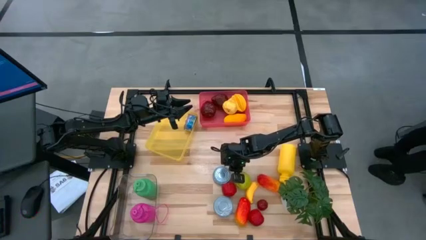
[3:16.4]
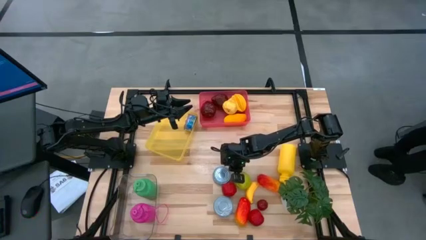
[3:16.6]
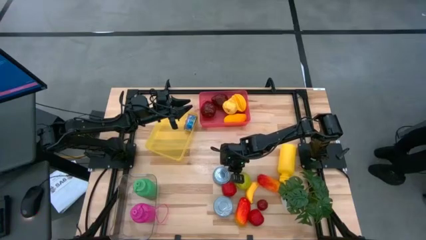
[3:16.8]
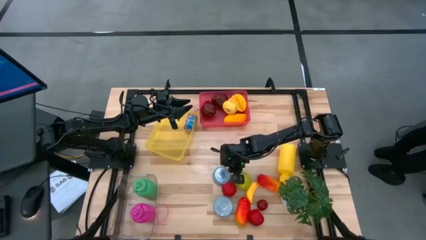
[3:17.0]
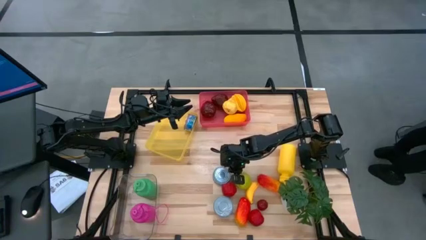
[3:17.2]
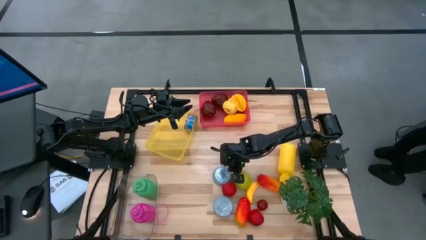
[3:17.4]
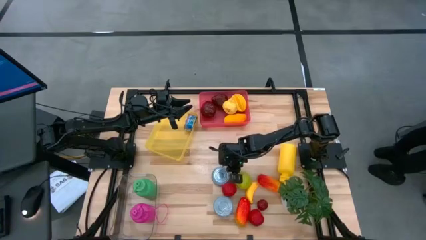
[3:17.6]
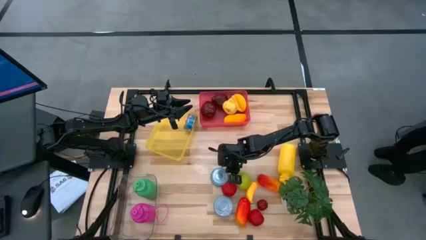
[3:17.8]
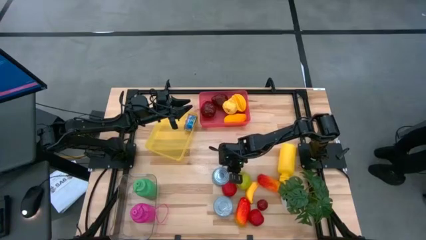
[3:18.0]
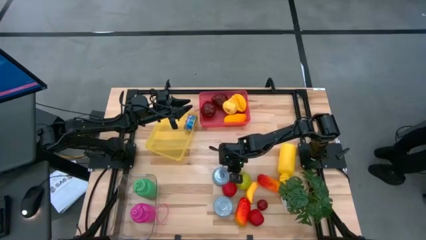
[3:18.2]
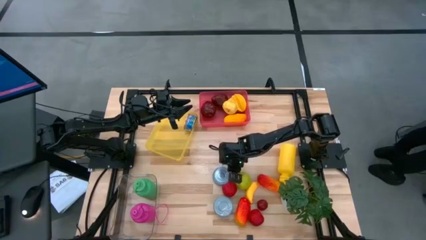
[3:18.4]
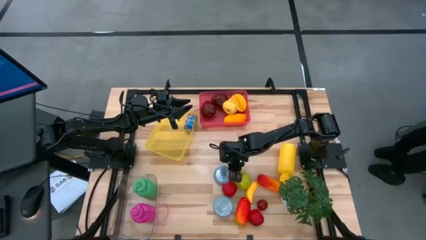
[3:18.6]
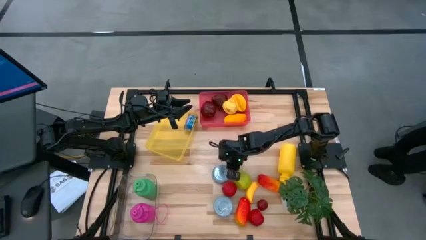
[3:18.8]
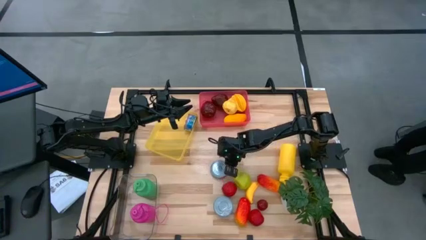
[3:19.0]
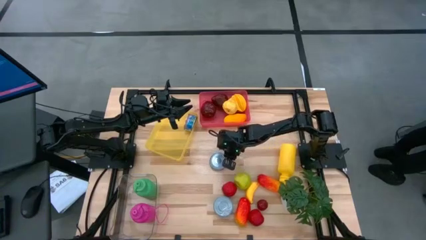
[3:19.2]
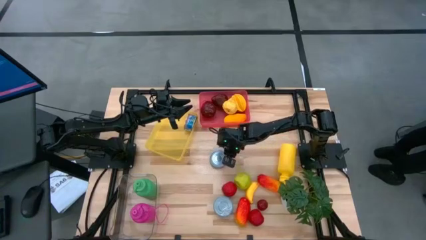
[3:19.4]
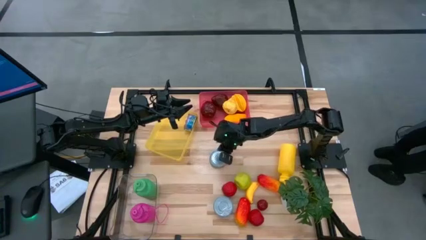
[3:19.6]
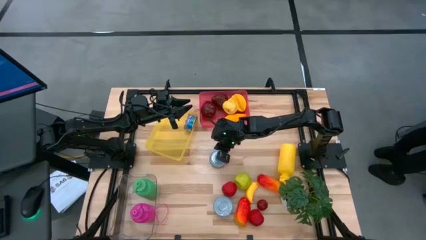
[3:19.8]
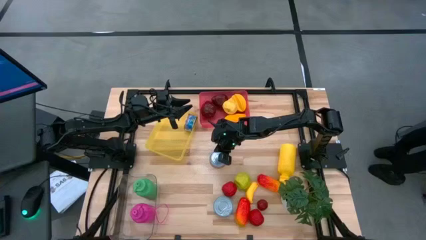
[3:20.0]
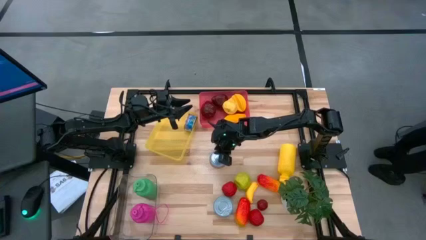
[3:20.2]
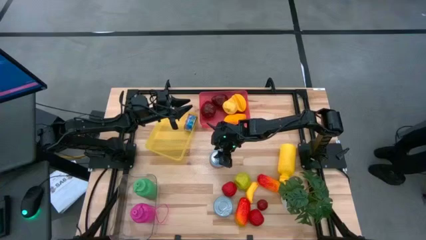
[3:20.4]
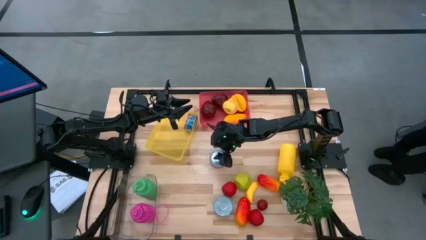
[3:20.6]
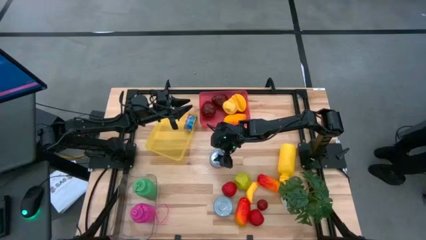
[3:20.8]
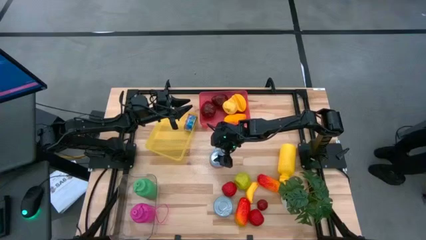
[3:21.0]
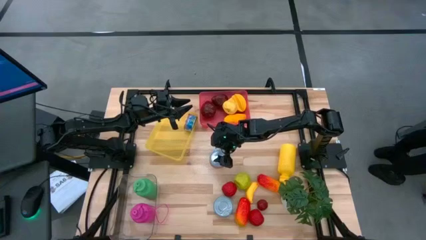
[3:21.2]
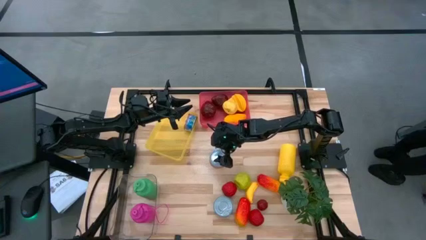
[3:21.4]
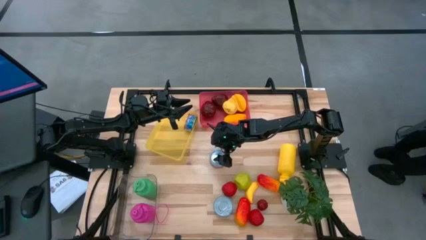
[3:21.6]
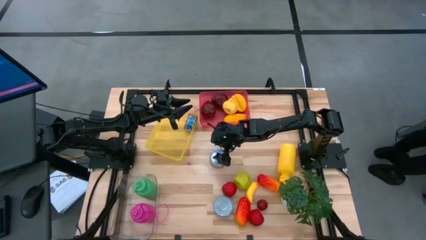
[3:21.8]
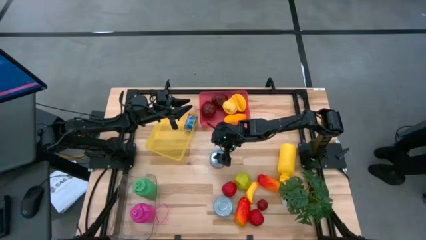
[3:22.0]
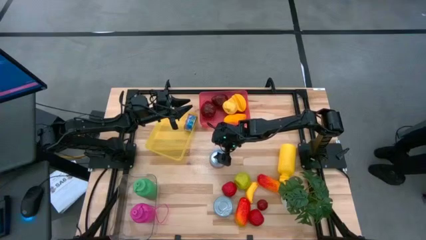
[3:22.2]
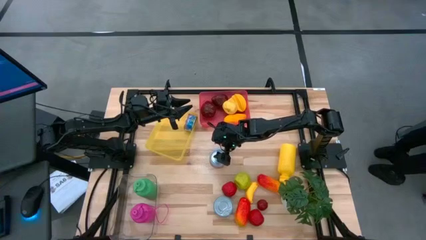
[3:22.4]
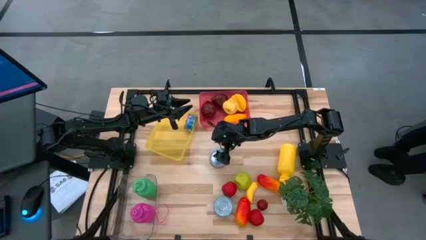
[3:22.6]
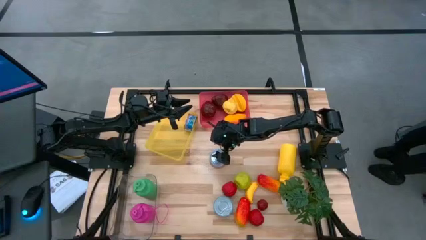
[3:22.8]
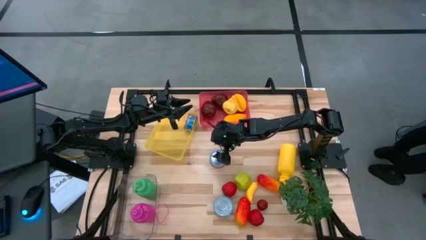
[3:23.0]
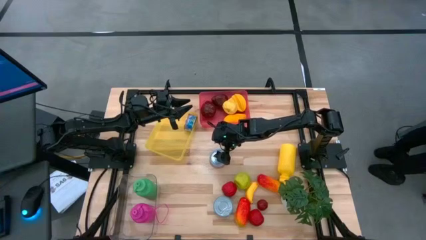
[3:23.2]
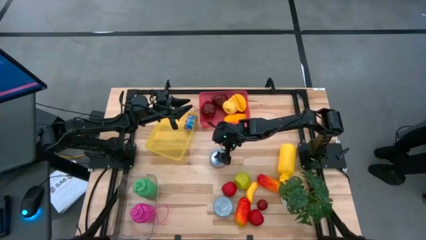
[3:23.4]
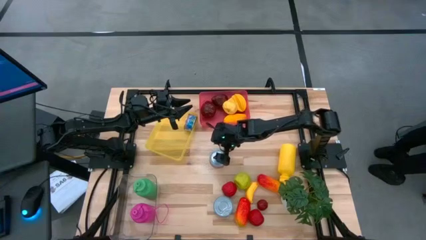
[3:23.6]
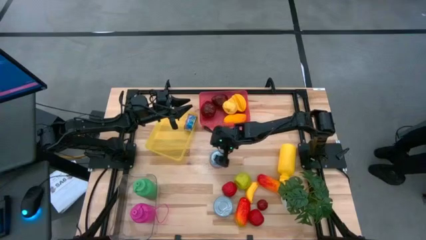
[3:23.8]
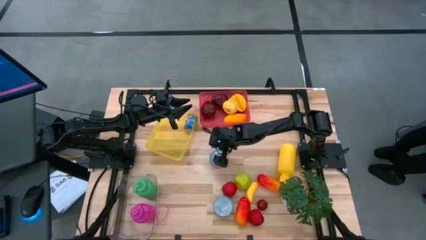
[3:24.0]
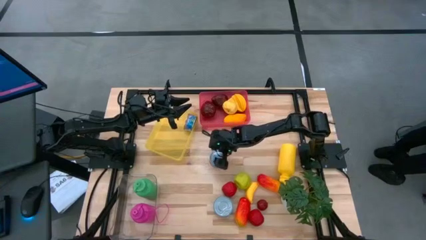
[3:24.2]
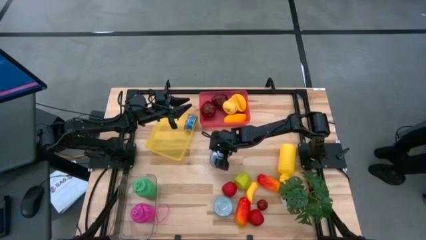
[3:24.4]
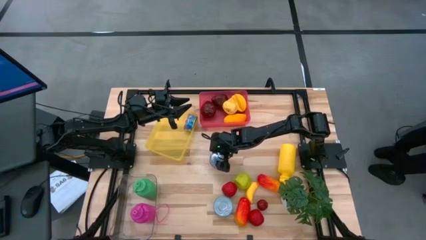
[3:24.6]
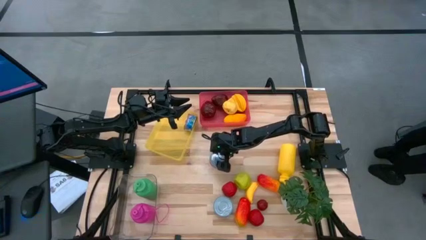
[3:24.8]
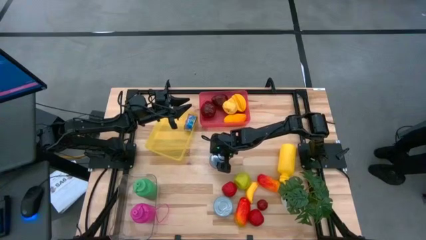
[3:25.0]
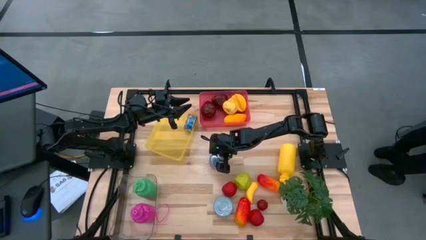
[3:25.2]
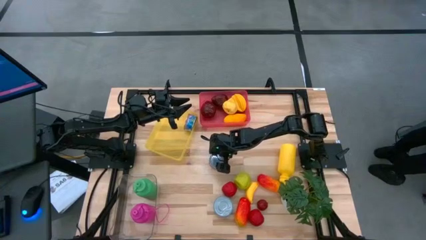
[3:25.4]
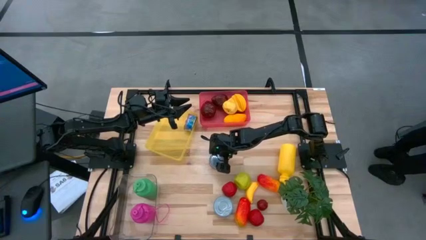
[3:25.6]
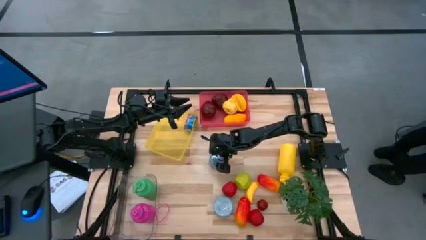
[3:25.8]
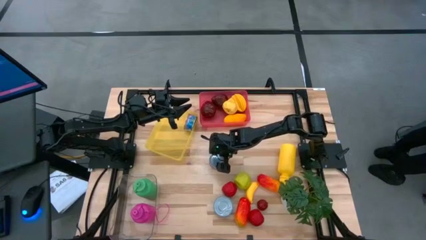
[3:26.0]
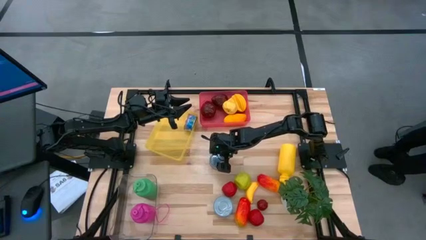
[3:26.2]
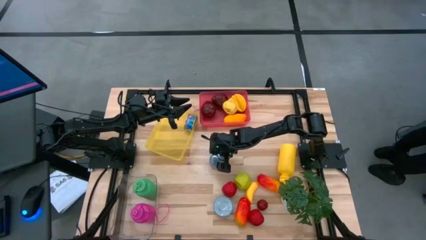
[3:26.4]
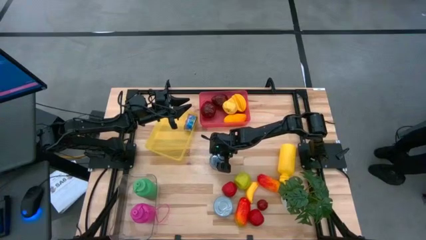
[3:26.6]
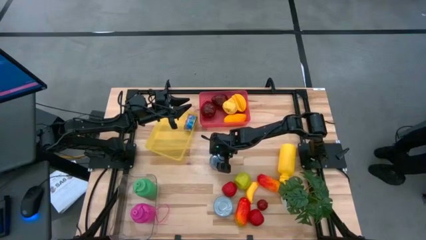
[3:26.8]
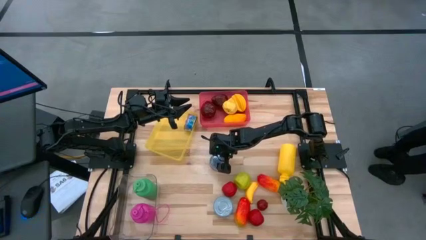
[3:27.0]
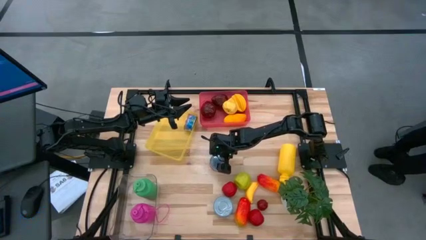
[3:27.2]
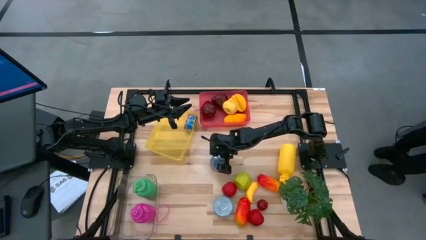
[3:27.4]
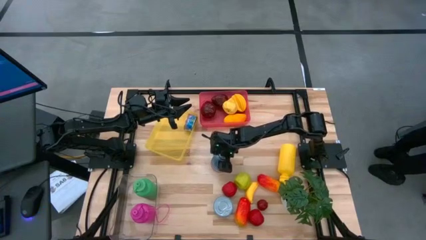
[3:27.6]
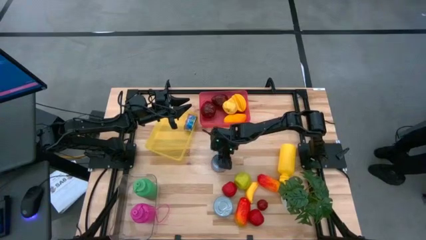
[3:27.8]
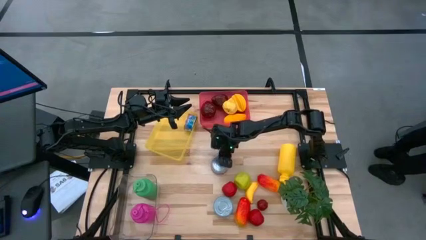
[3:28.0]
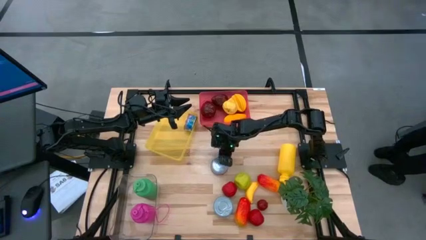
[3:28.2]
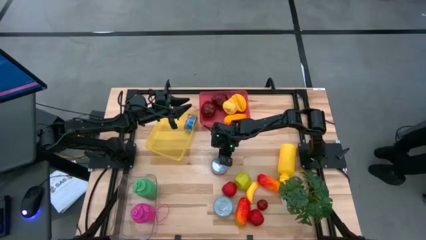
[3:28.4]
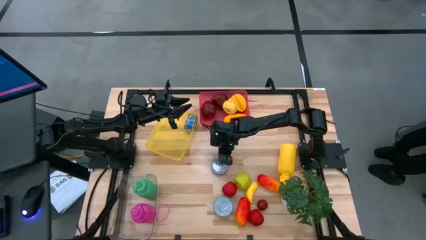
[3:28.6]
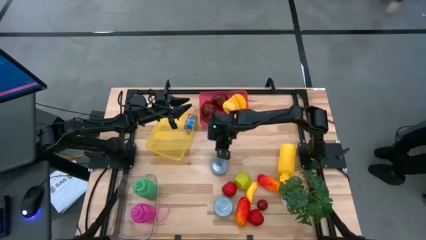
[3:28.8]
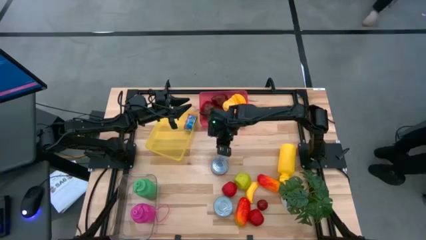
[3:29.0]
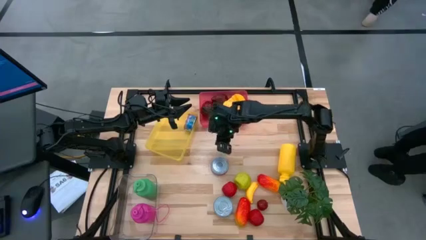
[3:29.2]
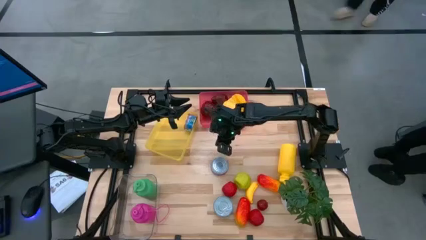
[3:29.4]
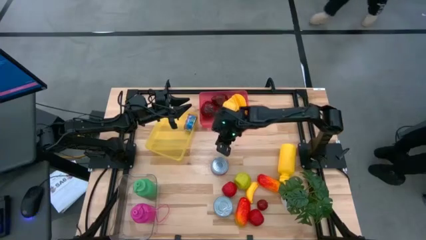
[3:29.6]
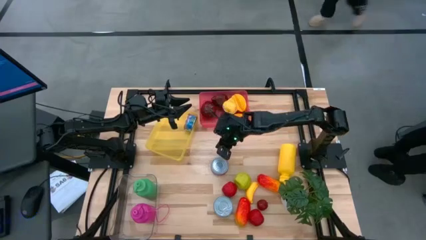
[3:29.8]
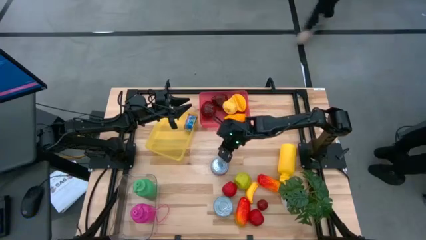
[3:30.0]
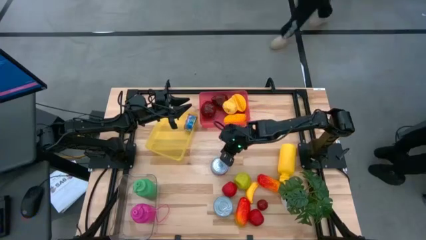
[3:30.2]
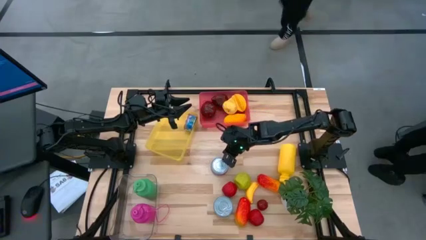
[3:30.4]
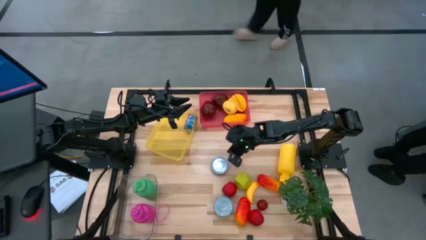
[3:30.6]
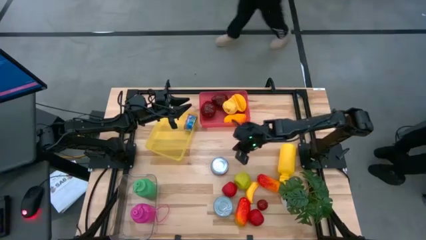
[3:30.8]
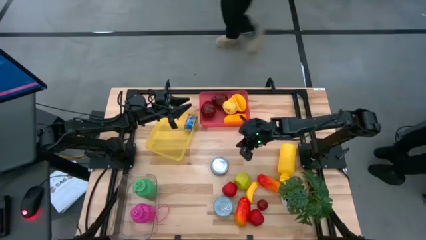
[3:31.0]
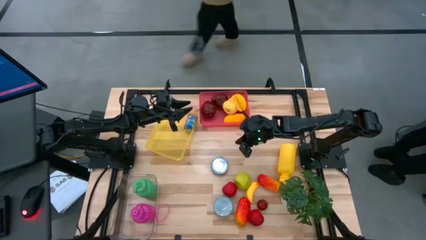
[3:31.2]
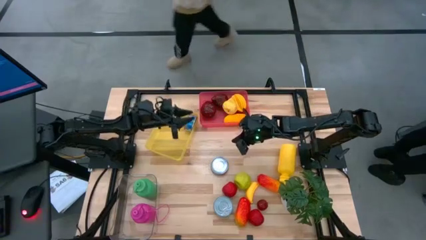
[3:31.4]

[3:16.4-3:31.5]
Task: Pick & Place Food Item
Put the red tuna can into the yellow bin
